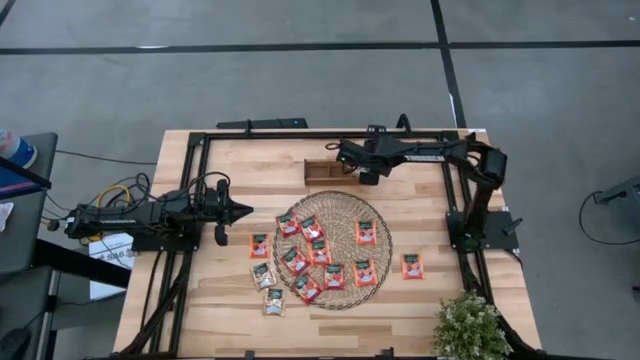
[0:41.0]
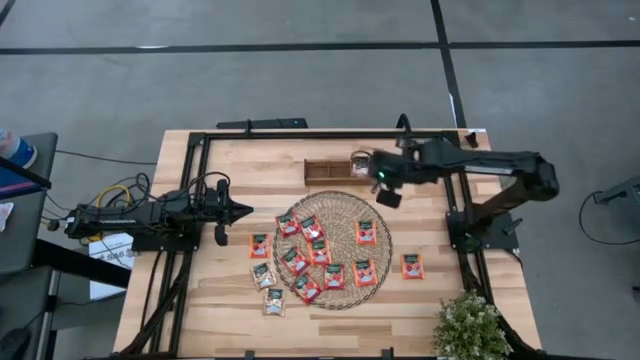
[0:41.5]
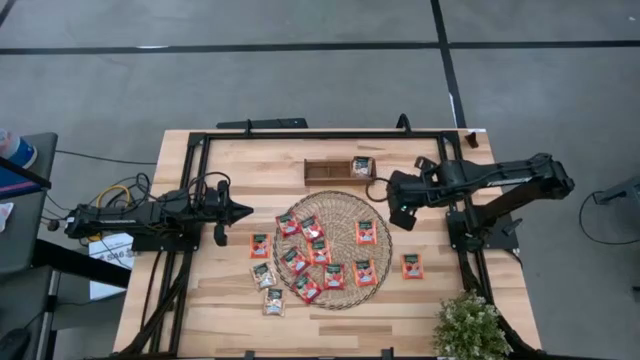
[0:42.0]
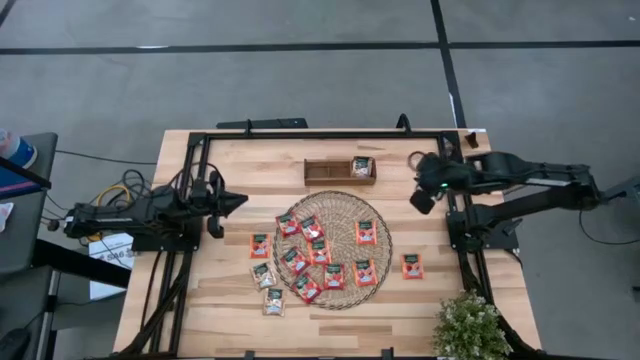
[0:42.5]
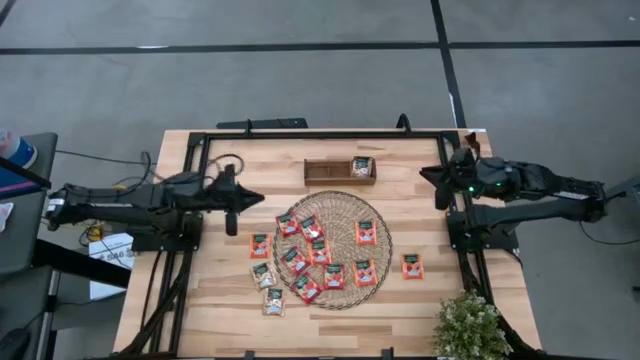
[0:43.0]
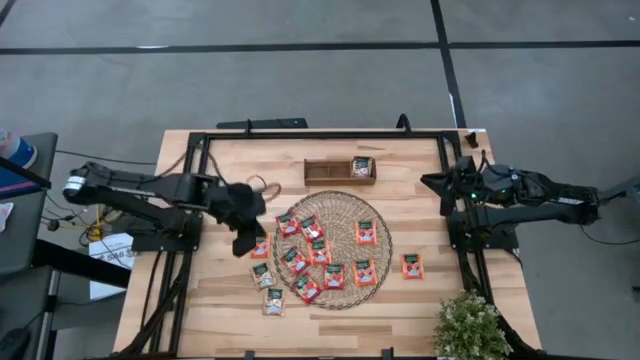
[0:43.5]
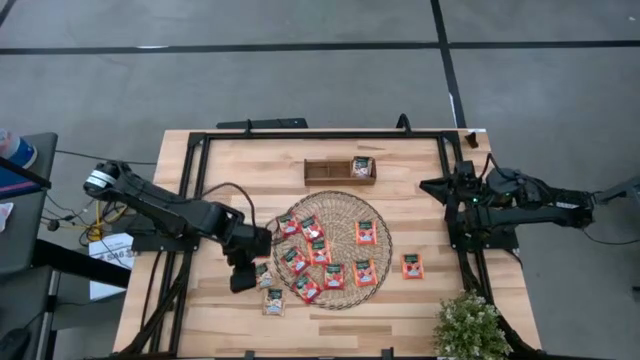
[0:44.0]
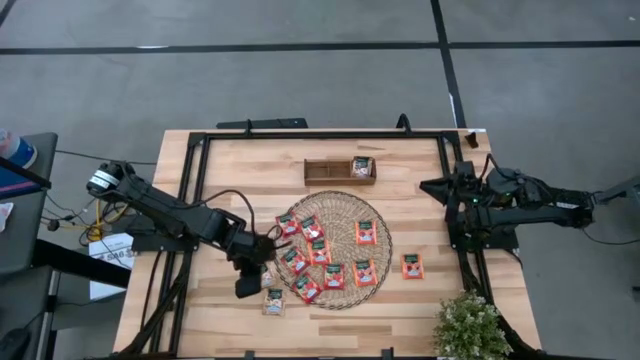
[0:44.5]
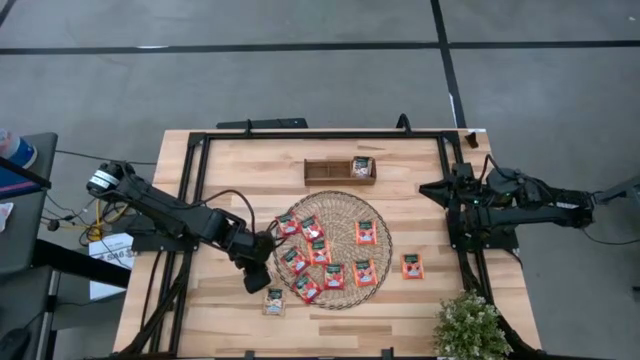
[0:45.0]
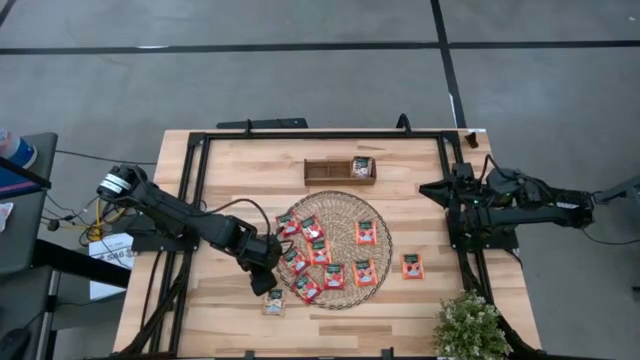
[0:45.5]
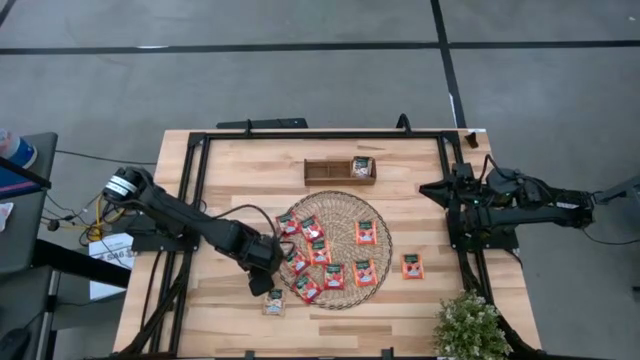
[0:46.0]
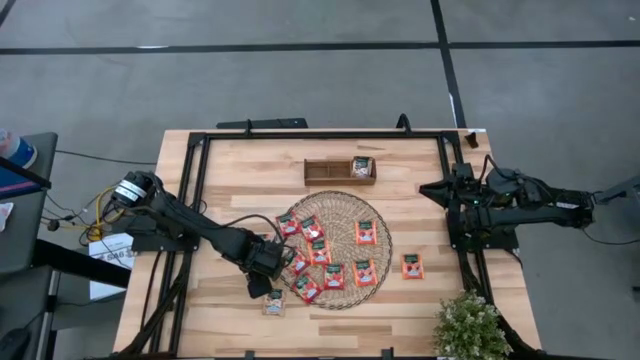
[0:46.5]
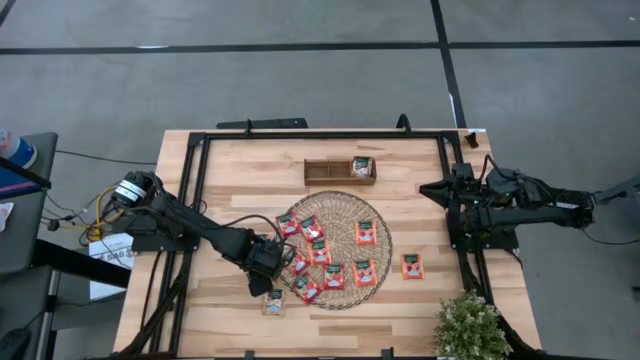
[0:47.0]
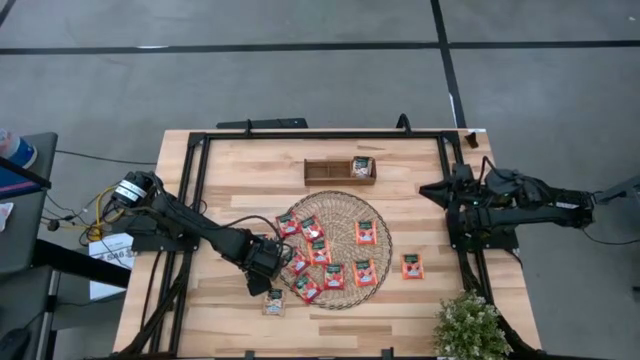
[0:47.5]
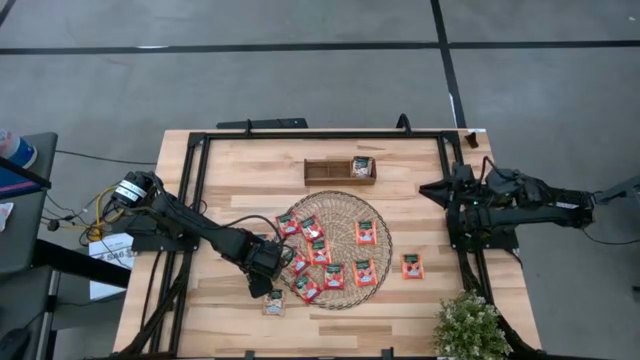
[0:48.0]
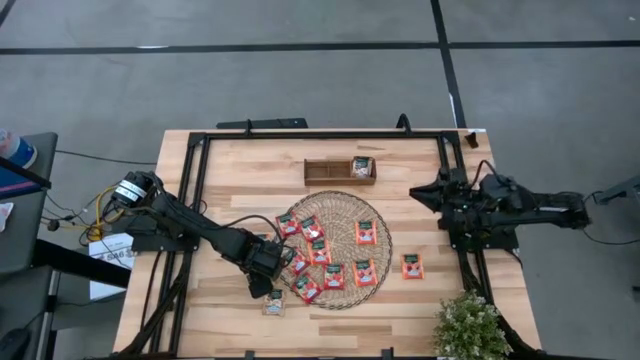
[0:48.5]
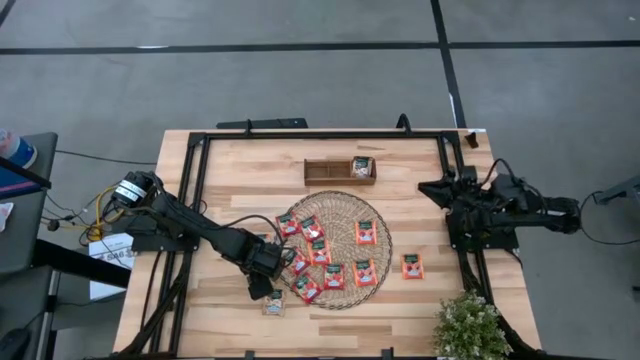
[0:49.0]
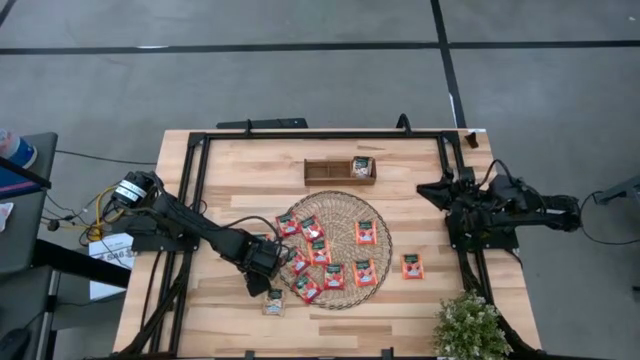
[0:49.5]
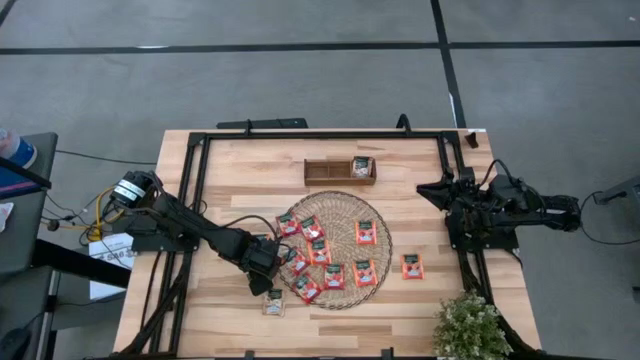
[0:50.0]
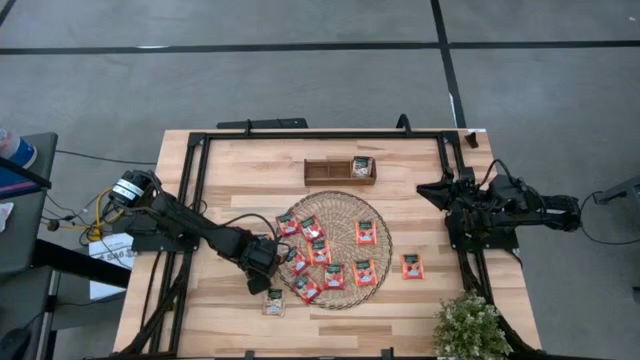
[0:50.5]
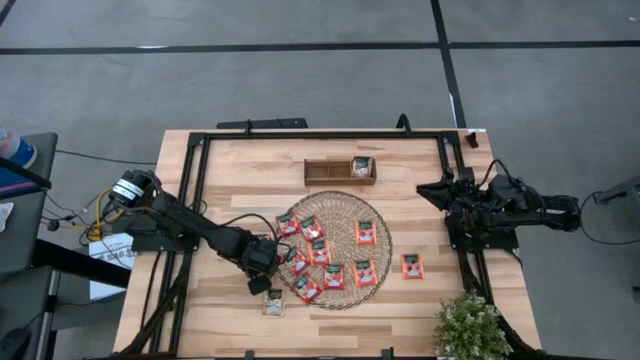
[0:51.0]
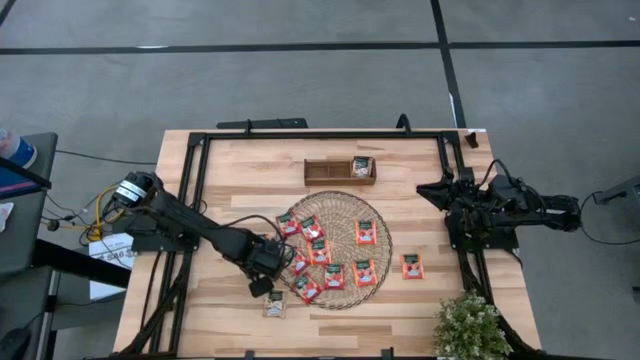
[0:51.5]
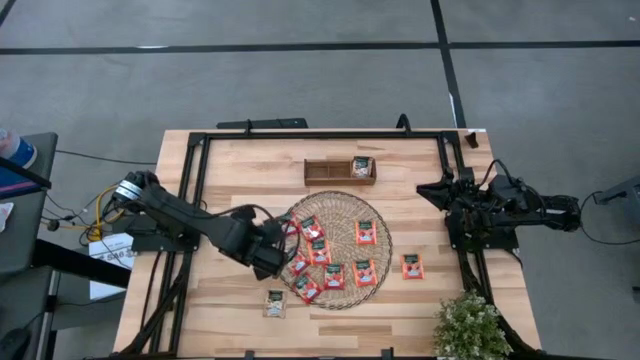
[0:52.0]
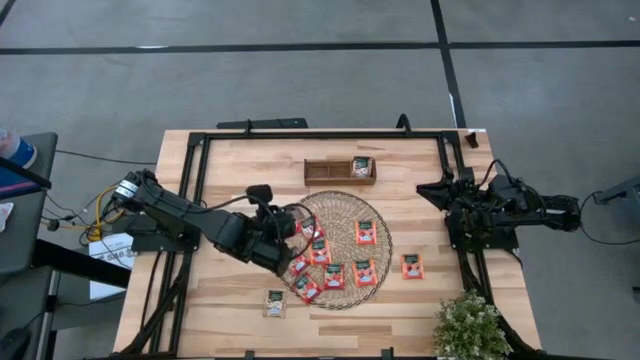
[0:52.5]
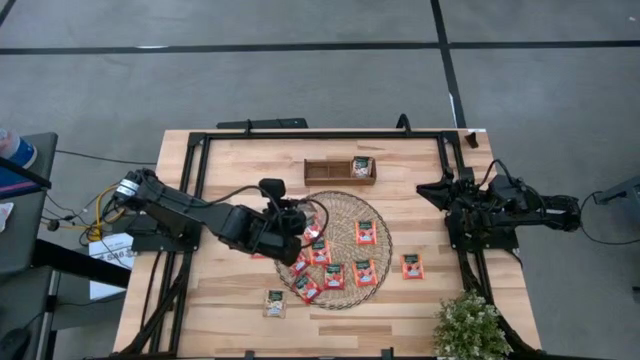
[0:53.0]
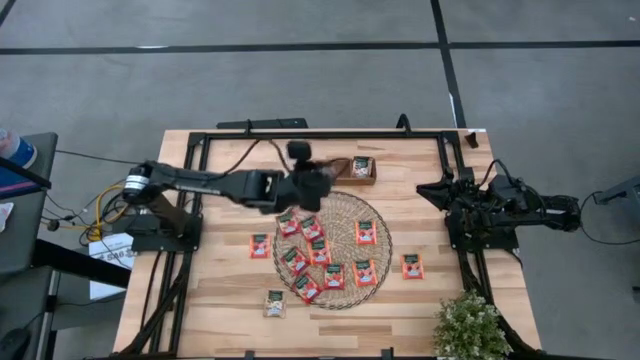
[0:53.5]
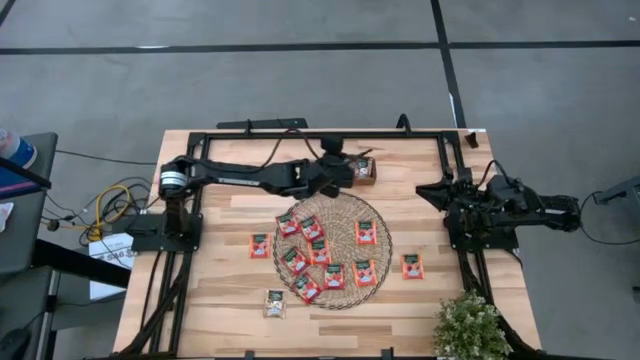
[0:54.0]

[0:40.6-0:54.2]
Task: Pick & Place Tea
Put the top brown tea bag into the right slot of the wooden organizer

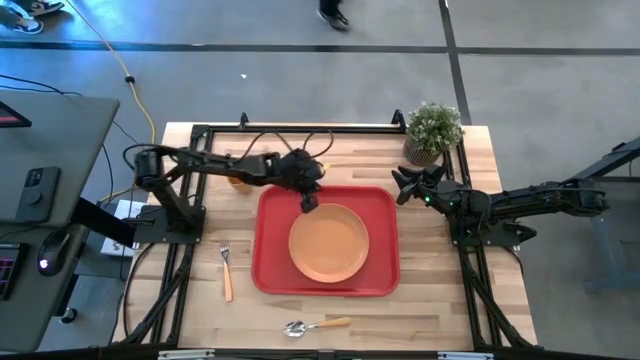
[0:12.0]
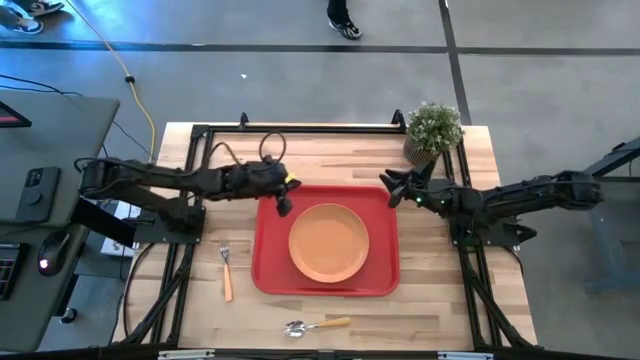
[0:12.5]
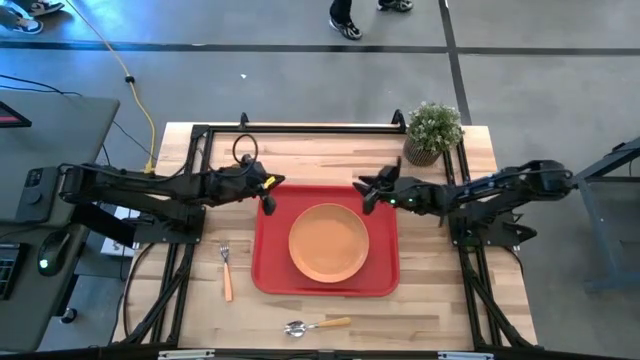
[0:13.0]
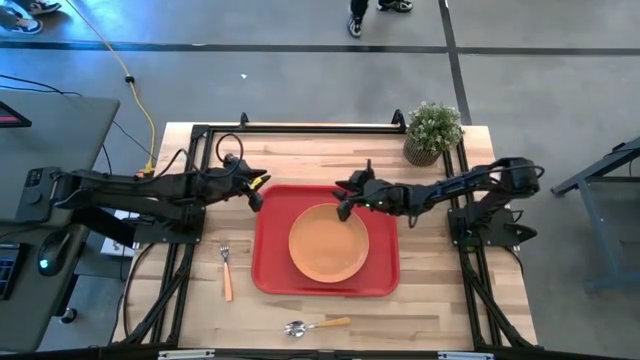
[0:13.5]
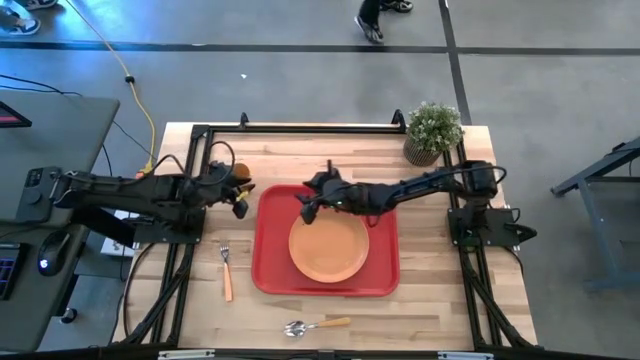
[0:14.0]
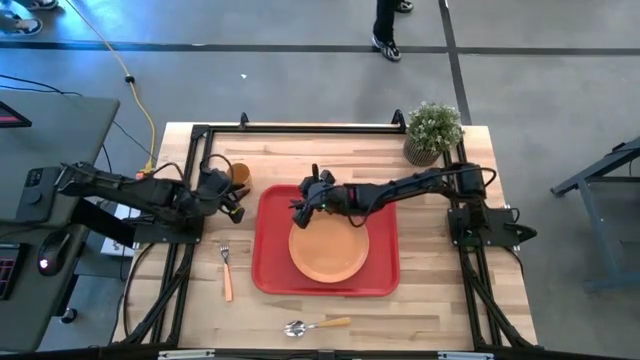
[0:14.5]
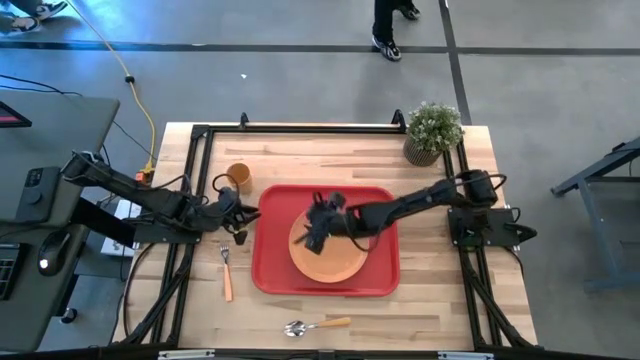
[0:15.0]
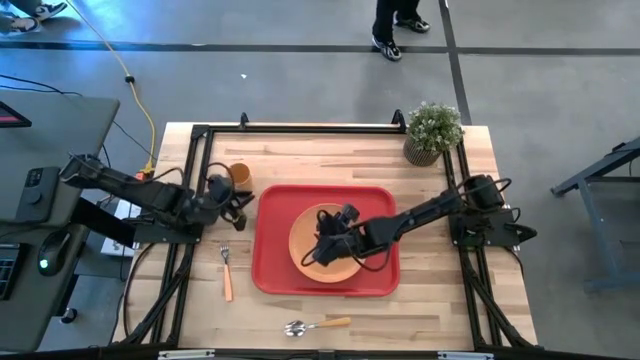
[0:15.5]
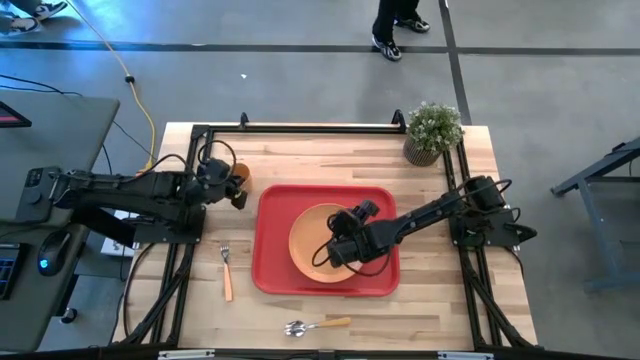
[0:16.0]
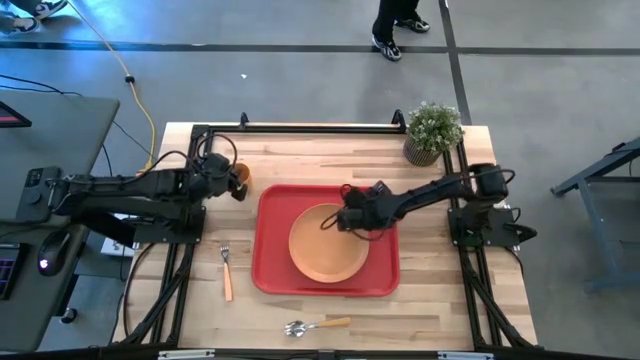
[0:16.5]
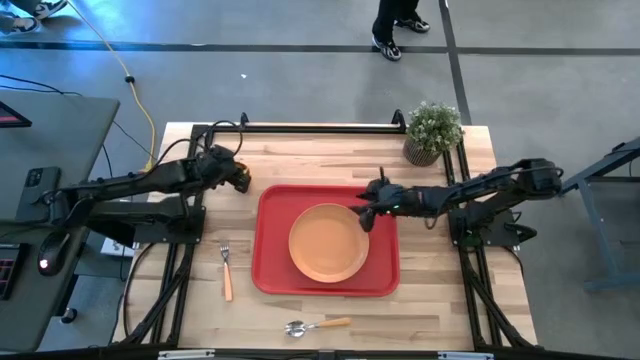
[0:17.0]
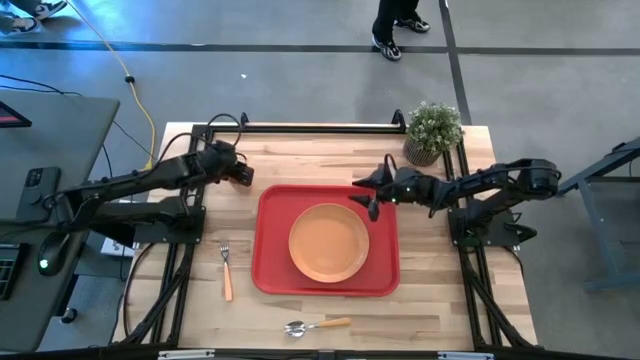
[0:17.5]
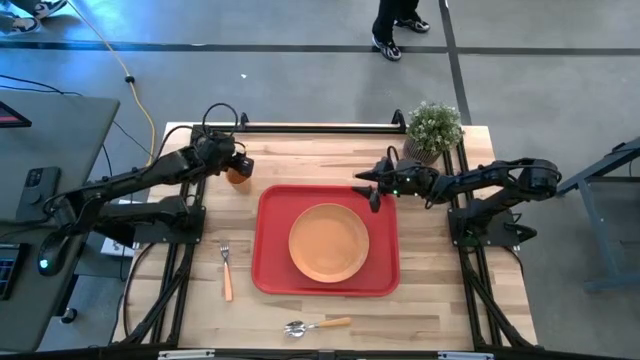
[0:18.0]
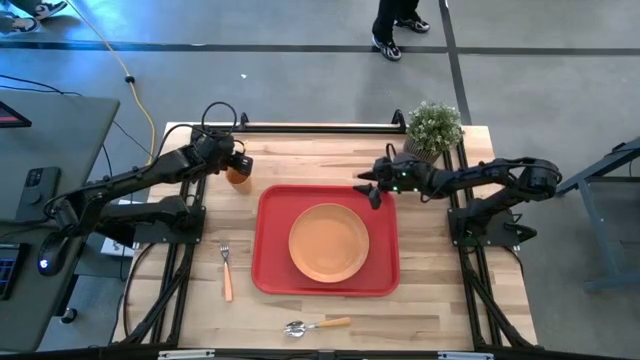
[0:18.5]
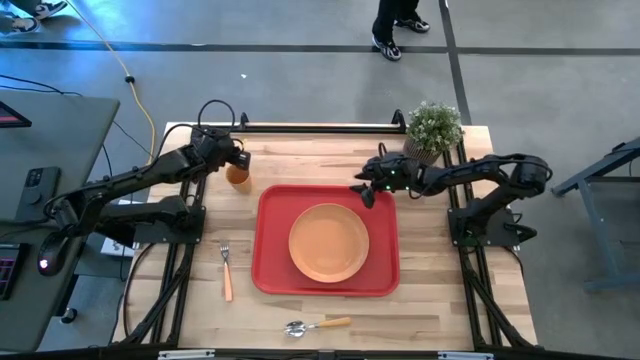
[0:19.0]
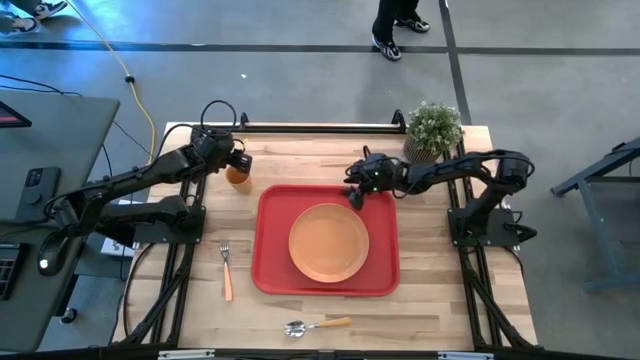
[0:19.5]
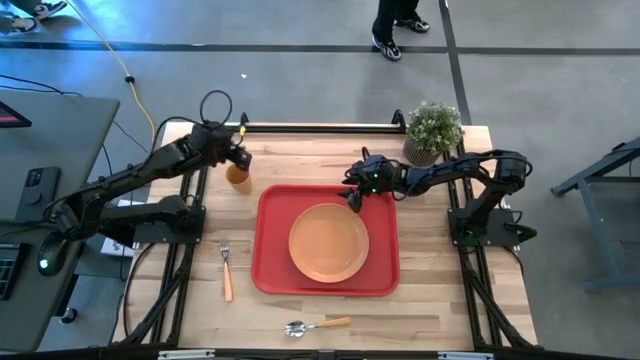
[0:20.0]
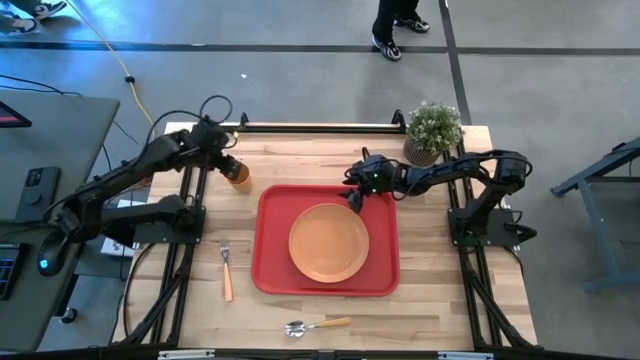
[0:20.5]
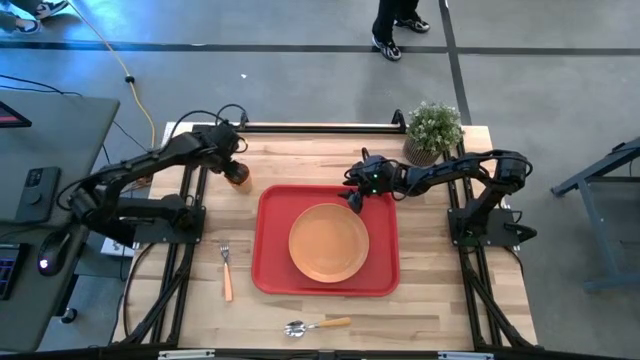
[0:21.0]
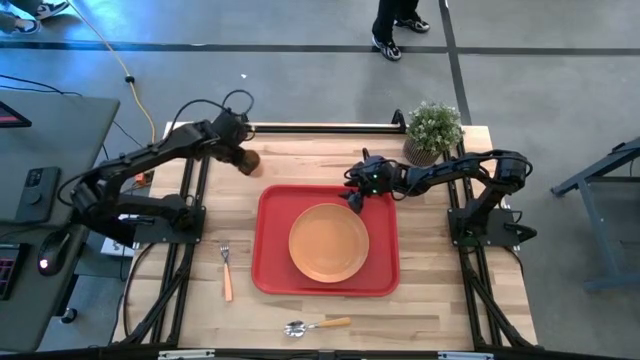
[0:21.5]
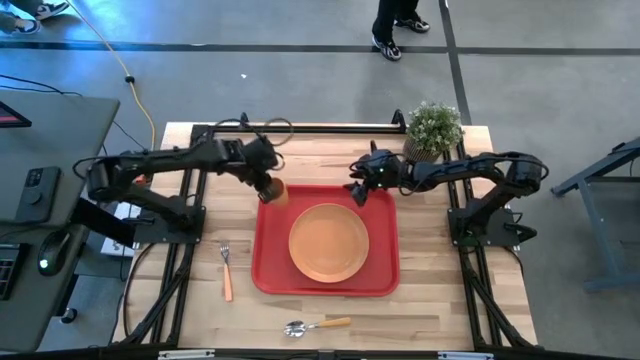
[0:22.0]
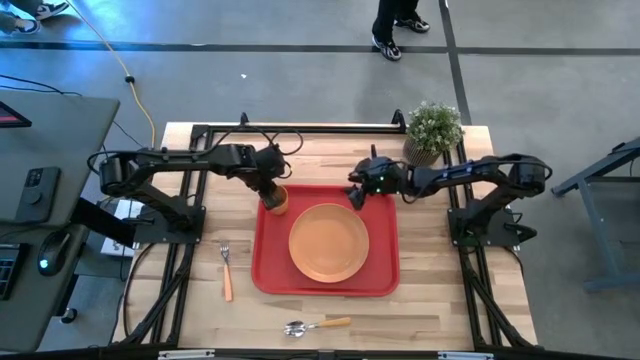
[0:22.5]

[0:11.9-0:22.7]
Task: Pick and place plate/cup/fork/spoon on tray
Put the orange cup on the red tray to the top left of the orange plate
